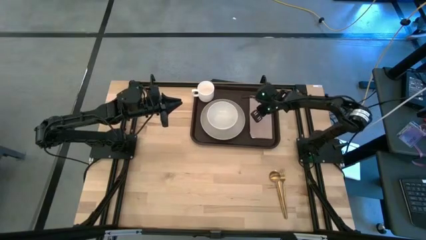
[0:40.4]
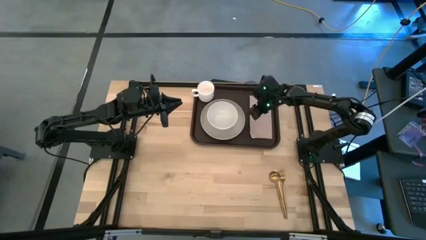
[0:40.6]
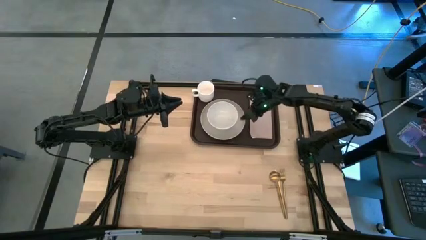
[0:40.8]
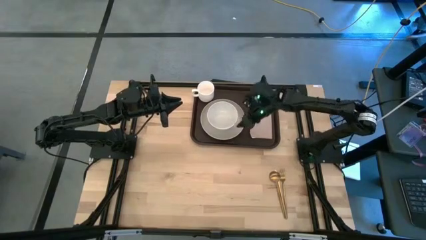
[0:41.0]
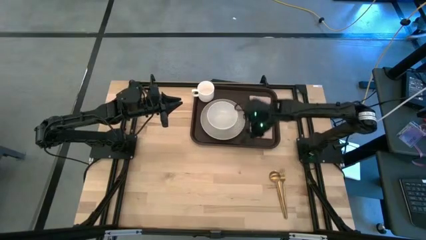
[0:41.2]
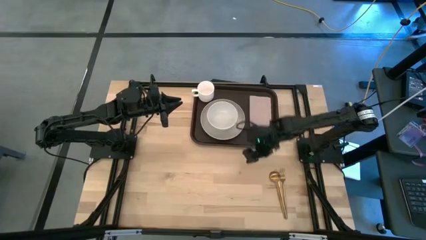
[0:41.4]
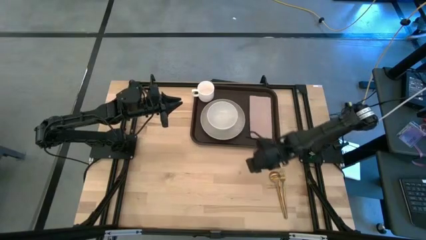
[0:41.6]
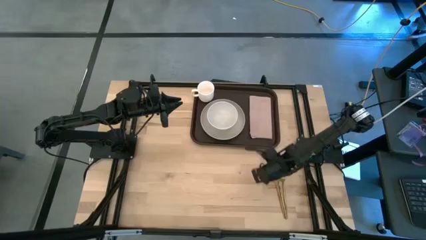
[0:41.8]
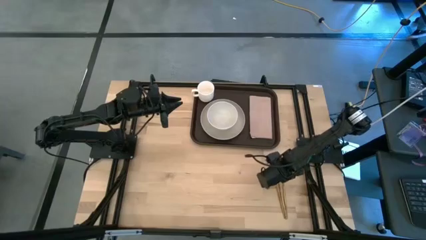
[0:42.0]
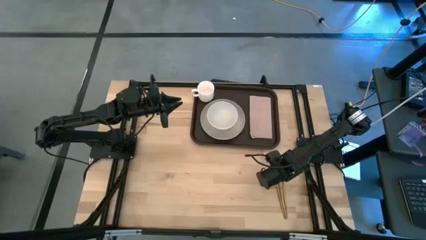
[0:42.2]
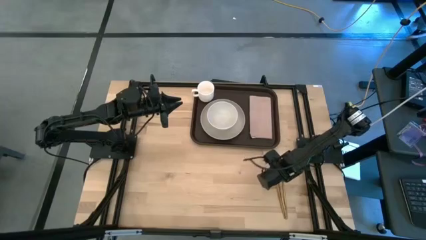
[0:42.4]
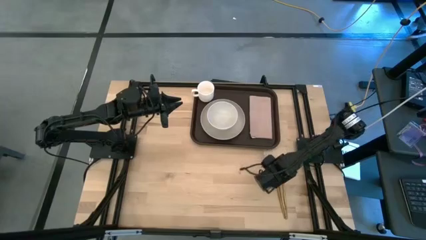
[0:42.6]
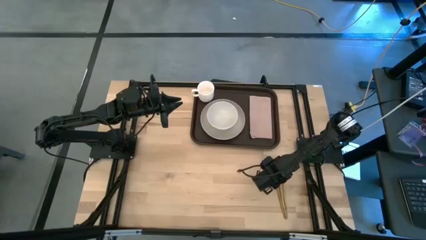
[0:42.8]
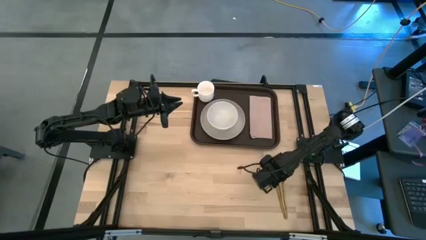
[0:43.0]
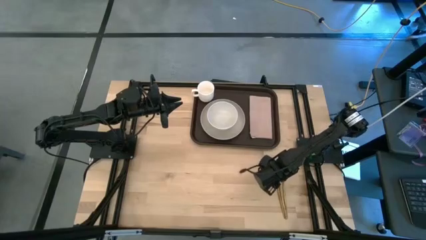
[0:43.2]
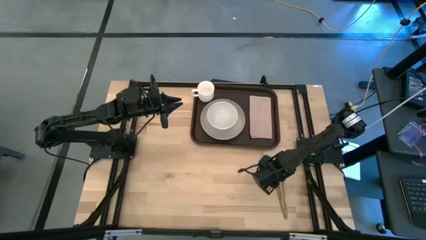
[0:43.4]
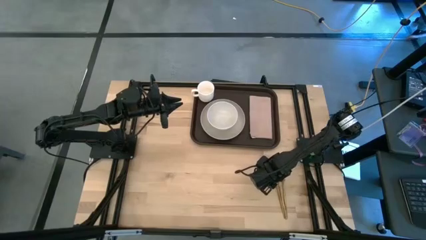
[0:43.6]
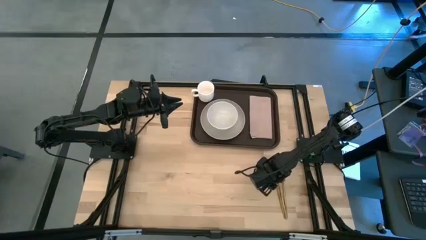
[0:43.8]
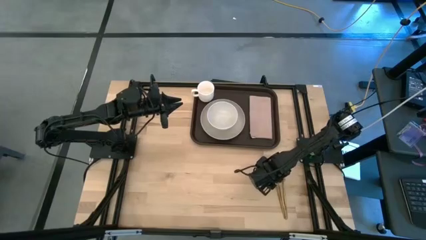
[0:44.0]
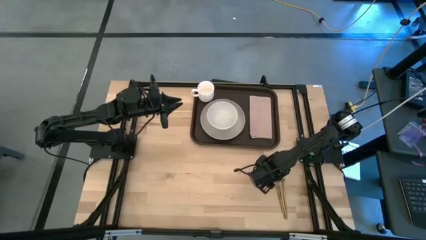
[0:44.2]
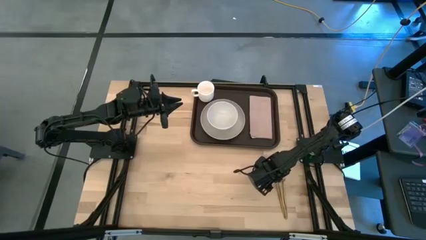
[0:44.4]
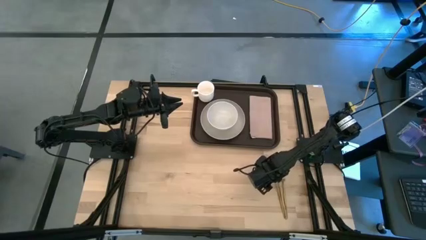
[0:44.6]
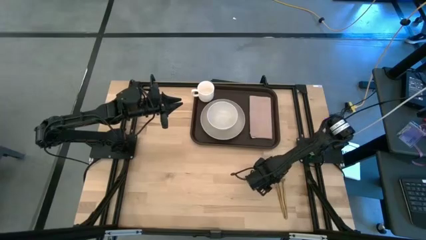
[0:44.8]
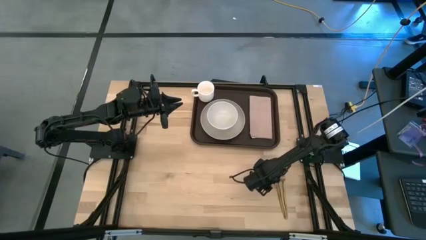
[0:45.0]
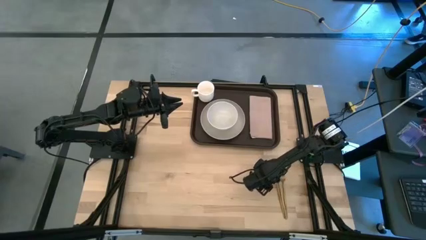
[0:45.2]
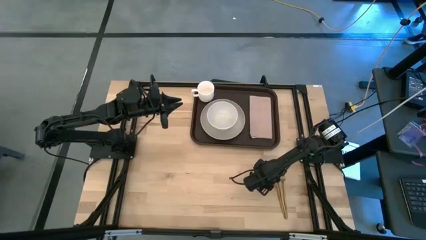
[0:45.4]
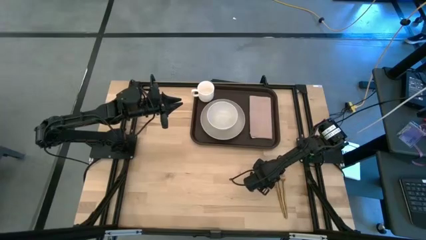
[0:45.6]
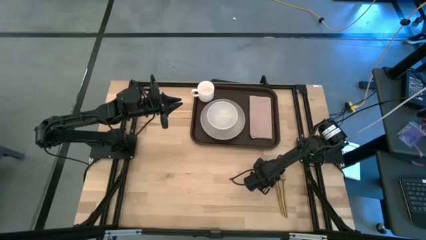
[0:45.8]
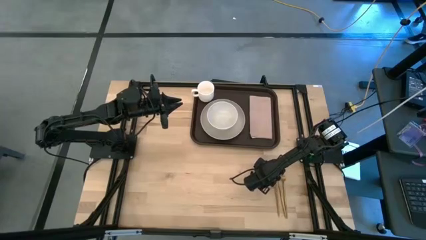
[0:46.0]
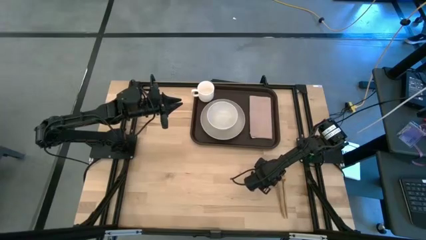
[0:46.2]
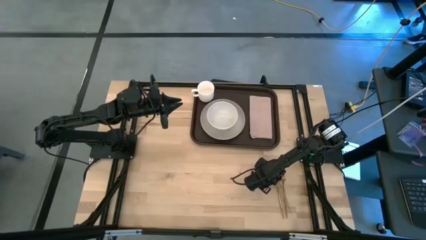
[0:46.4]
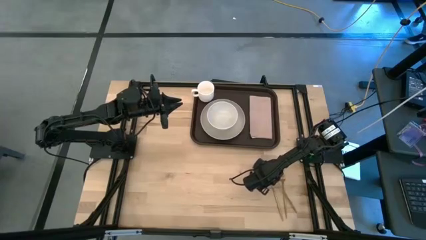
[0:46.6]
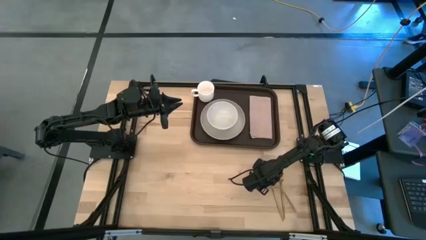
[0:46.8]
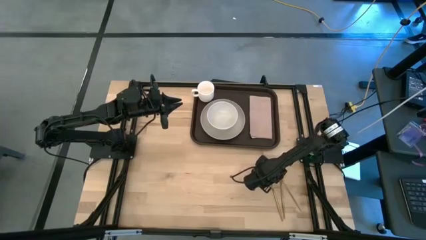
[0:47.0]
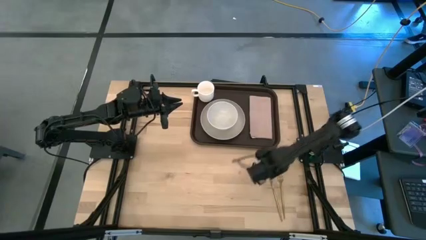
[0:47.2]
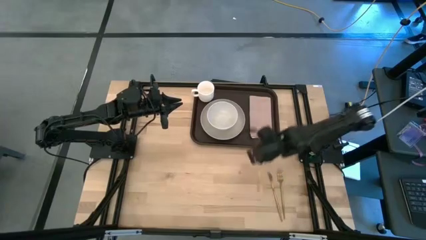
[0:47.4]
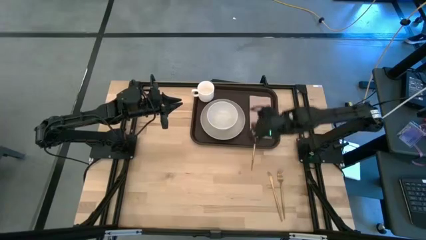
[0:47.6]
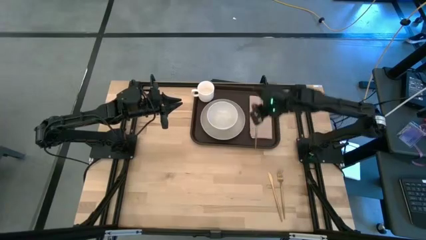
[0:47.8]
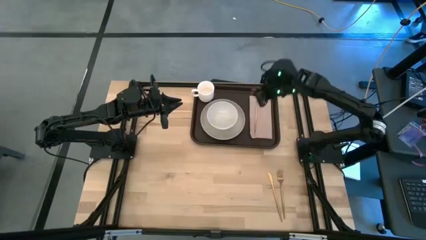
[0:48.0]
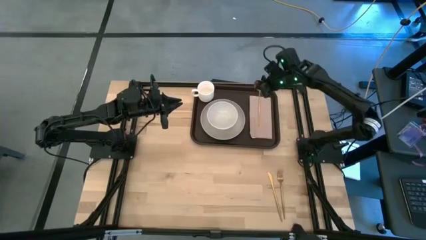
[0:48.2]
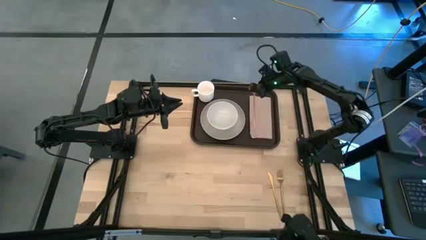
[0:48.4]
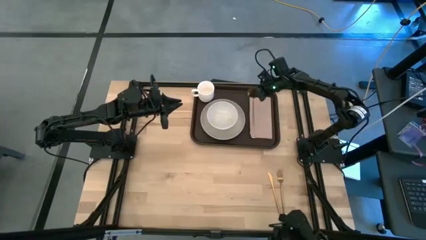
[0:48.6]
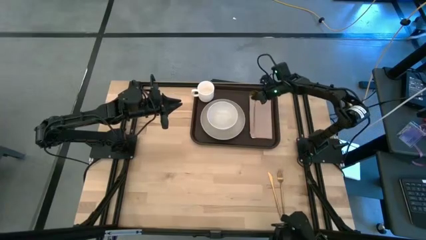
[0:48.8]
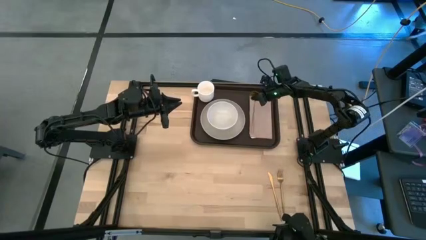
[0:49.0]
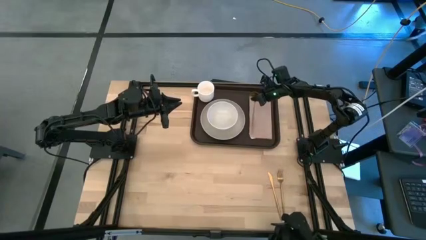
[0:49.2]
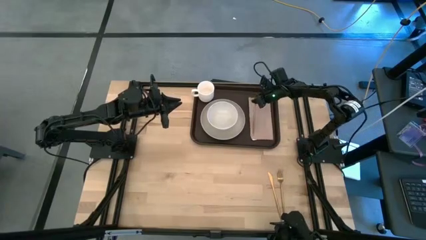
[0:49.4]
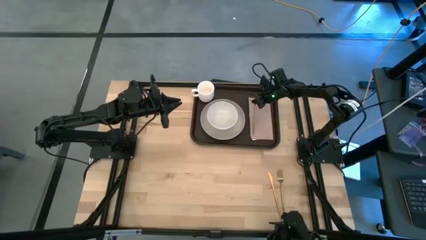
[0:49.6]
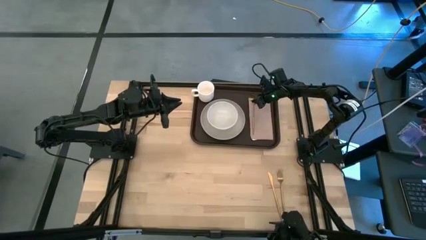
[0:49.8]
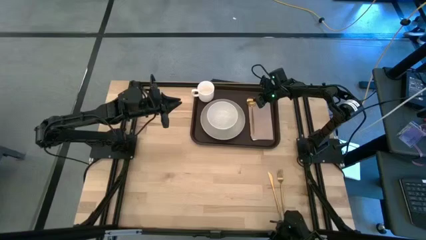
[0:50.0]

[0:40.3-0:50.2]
Task: Set up tray
Put the gold spoon to the right of the gray plate on the brown napkin on the black serving tray

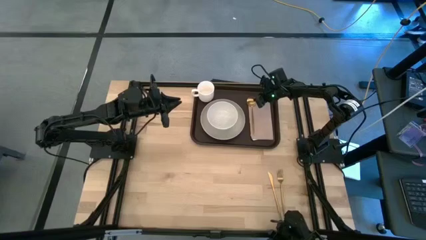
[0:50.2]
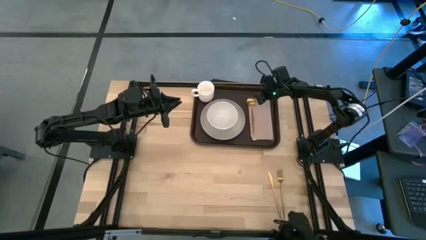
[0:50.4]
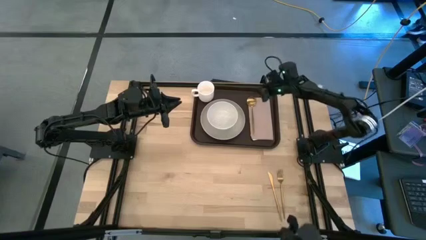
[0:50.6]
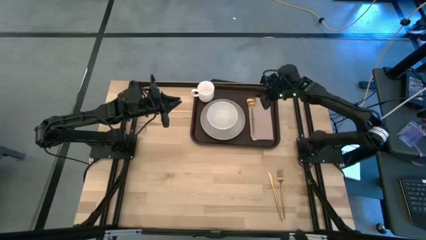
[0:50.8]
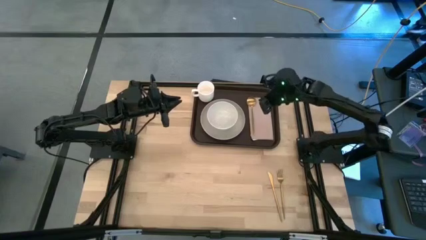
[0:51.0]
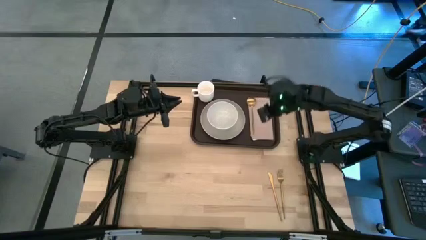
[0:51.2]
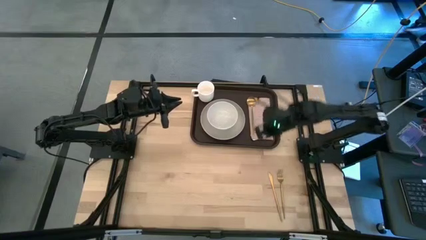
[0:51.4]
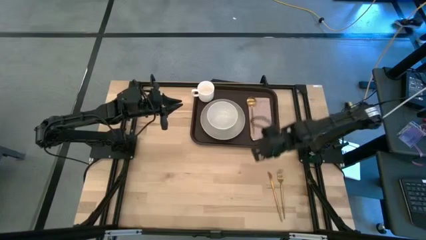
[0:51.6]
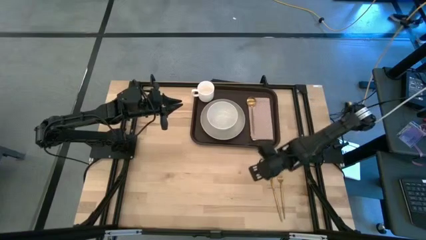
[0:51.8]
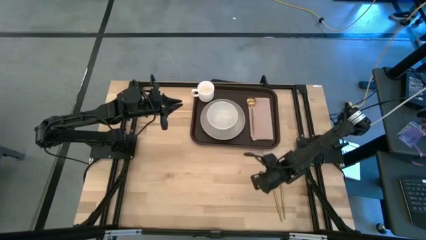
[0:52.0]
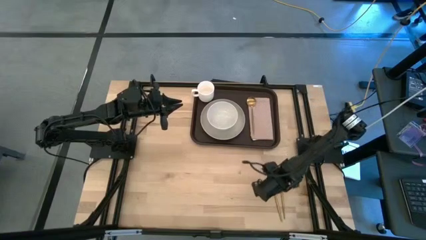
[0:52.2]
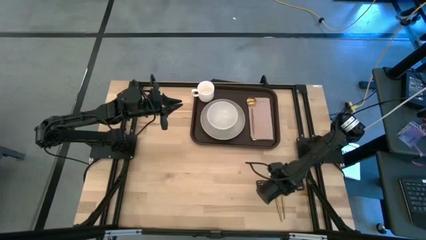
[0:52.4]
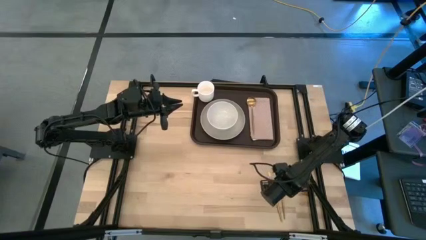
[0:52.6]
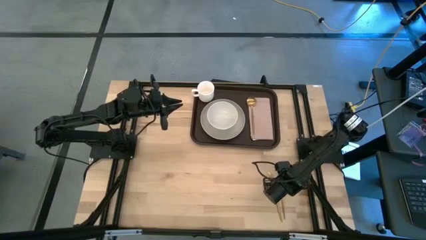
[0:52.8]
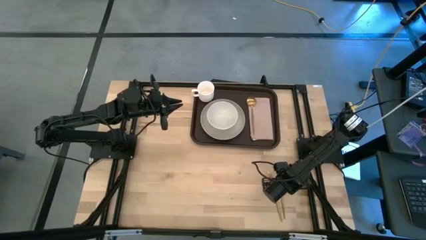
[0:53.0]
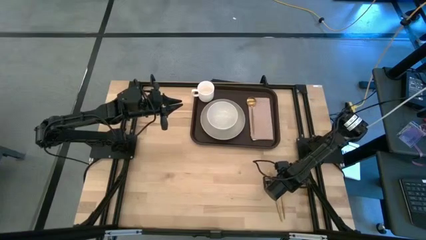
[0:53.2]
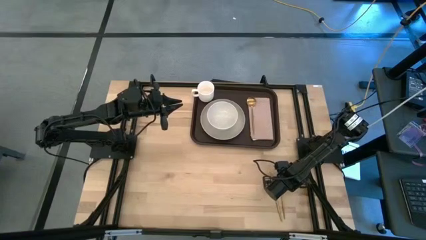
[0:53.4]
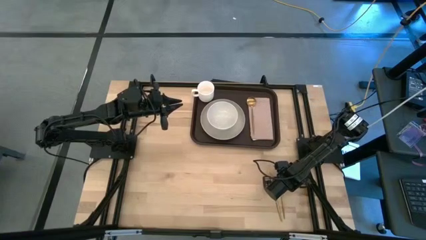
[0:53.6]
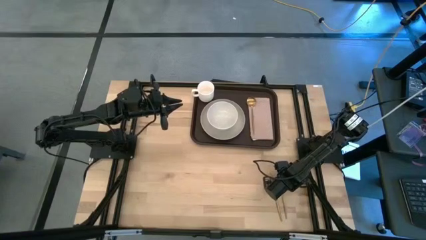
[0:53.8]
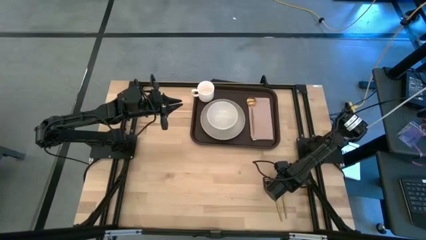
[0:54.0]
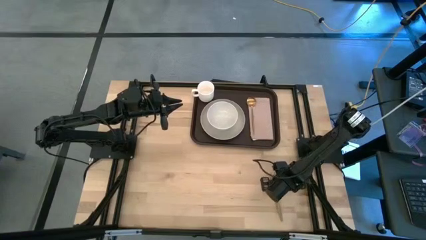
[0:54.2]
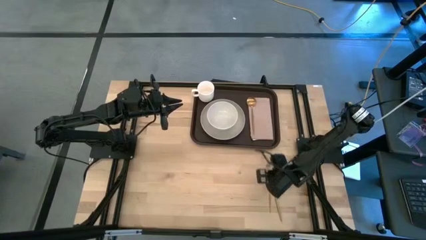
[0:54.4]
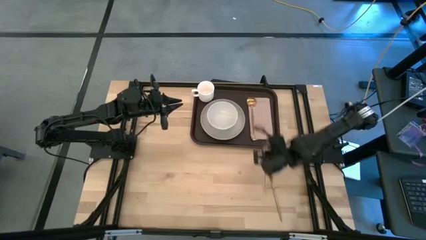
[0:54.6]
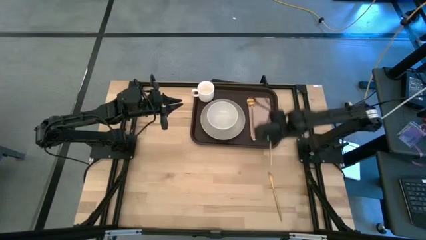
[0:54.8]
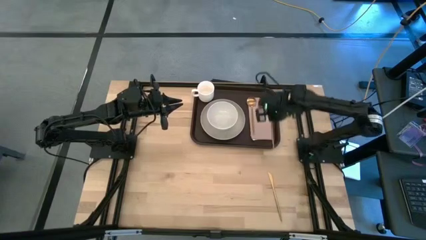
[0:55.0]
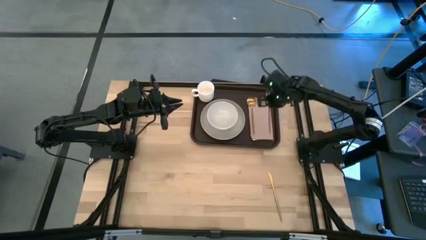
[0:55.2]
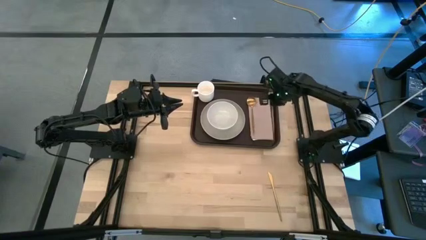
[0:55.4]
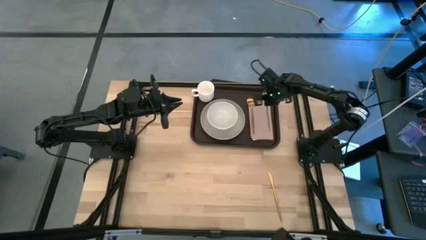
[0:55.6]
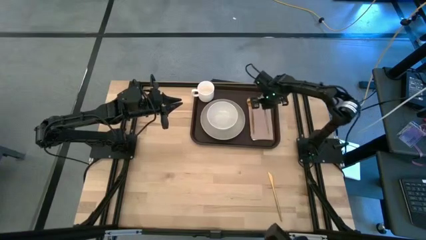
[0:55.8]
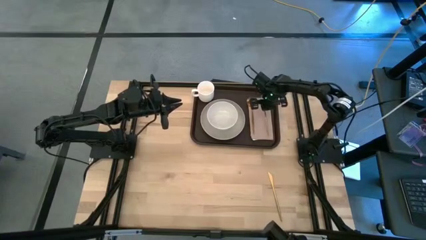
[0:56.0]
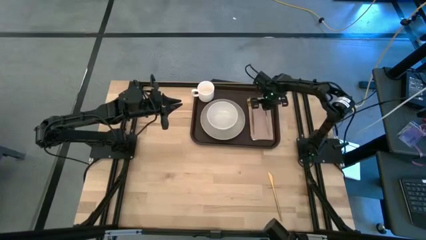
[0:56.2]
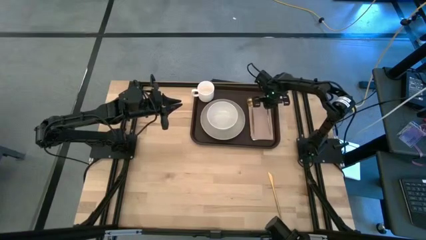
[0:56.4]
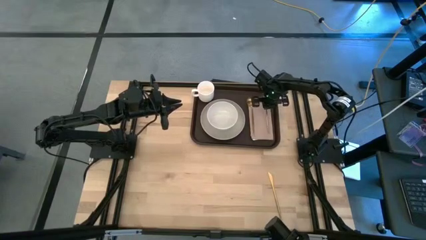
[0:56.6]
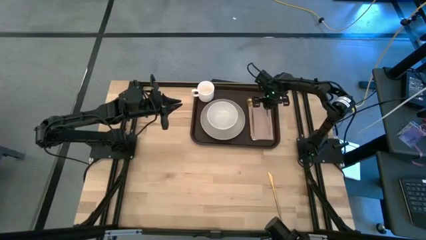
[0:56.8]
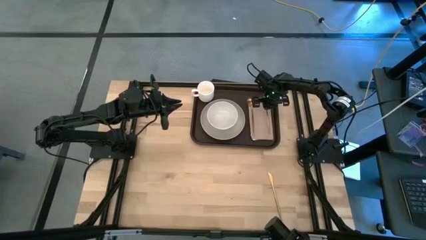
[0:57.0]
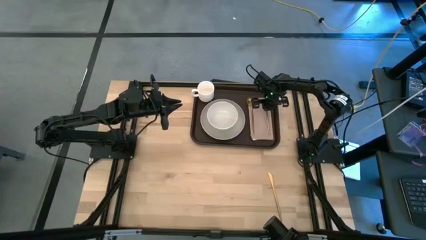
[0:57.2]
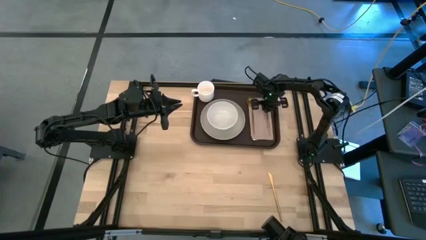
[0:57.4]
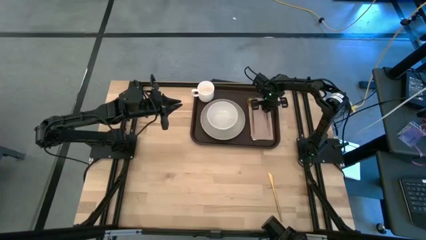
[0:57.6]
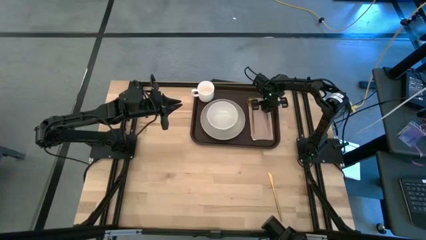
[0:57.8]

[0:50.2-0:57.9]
Put the gold fork to the right of the gold spoon on the brown napkin on the black serving tray
